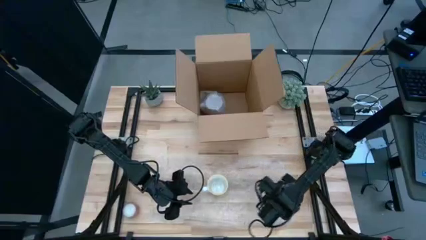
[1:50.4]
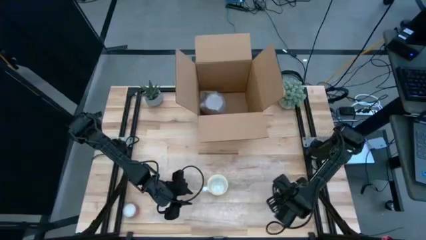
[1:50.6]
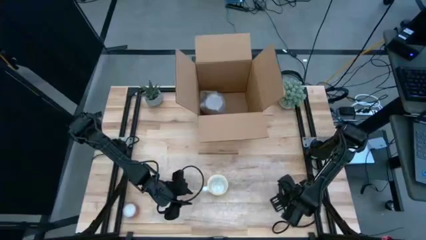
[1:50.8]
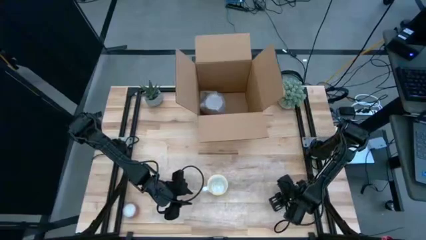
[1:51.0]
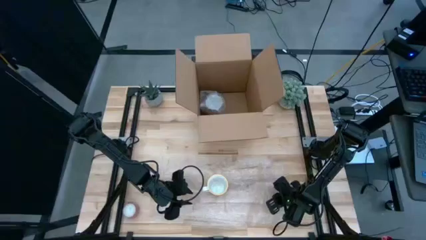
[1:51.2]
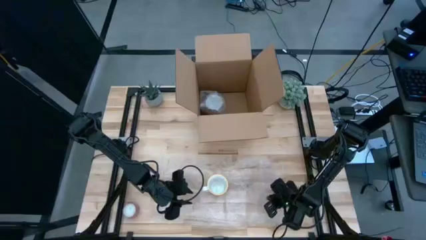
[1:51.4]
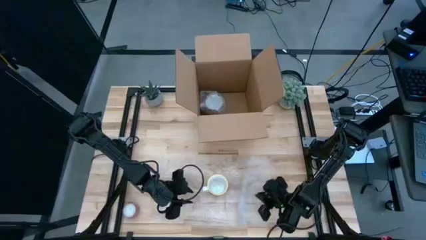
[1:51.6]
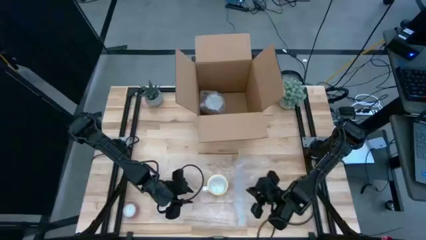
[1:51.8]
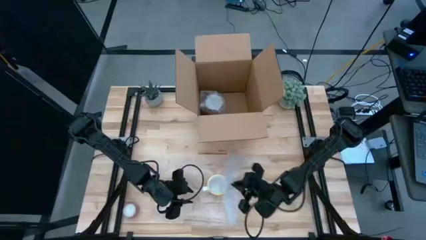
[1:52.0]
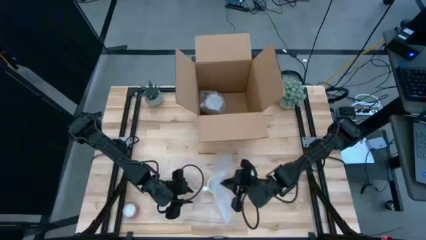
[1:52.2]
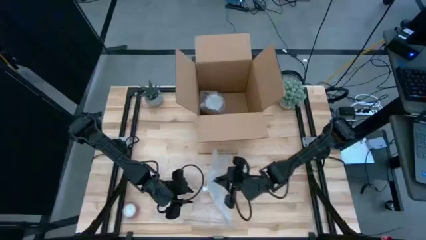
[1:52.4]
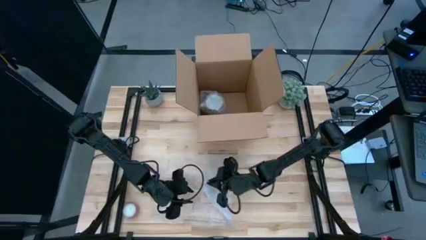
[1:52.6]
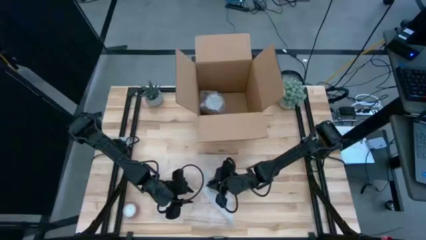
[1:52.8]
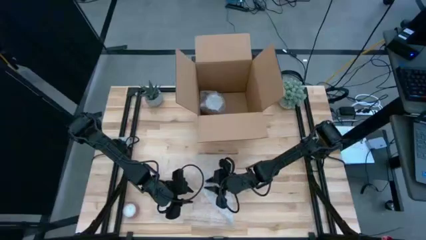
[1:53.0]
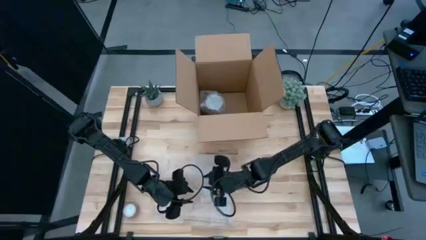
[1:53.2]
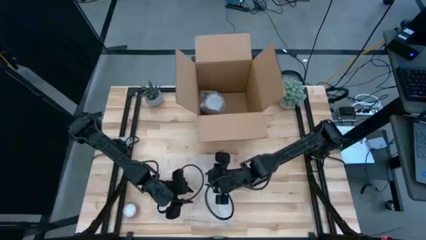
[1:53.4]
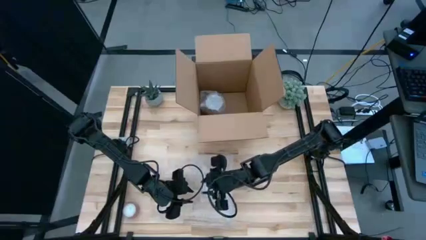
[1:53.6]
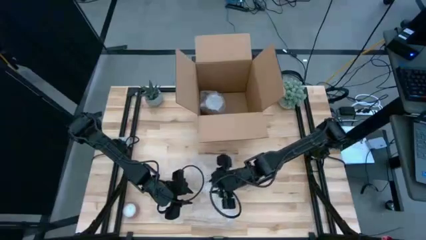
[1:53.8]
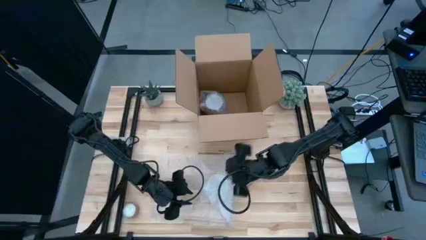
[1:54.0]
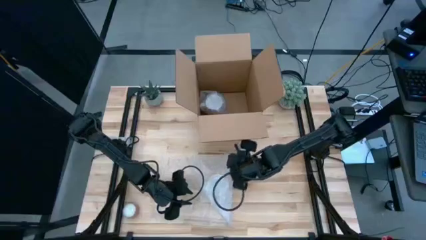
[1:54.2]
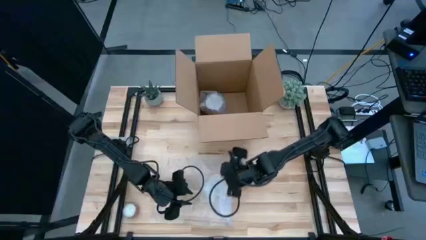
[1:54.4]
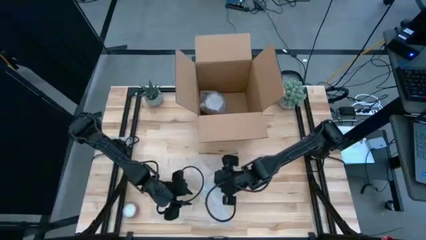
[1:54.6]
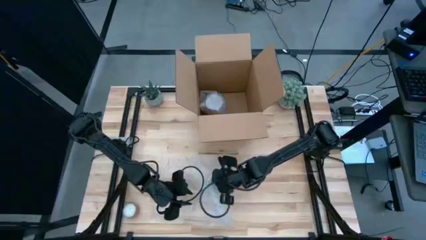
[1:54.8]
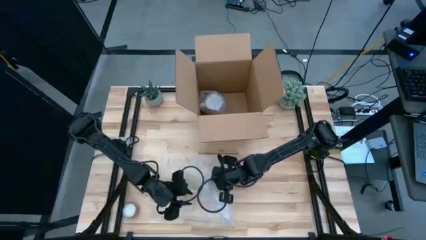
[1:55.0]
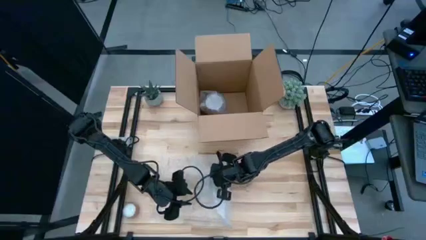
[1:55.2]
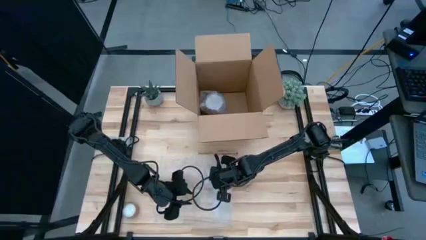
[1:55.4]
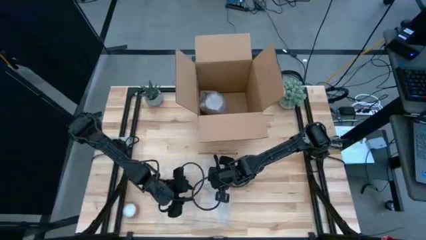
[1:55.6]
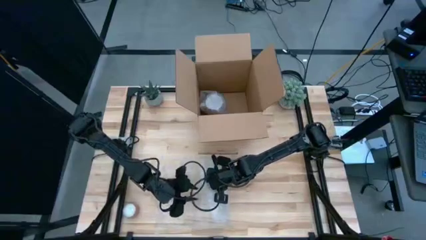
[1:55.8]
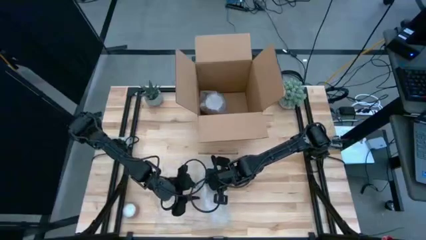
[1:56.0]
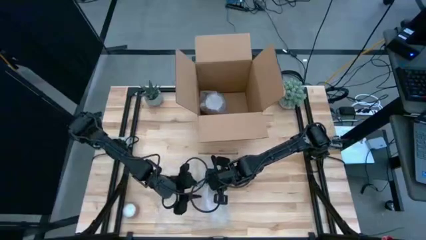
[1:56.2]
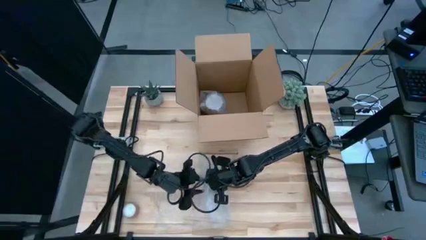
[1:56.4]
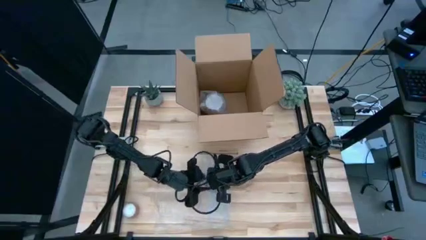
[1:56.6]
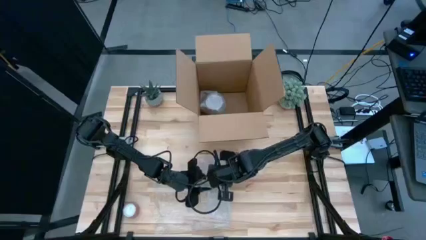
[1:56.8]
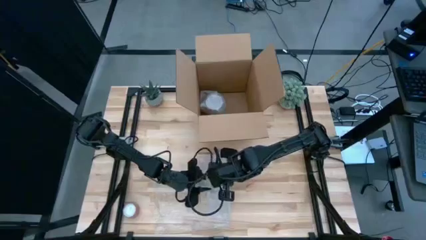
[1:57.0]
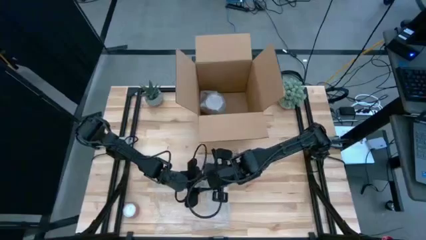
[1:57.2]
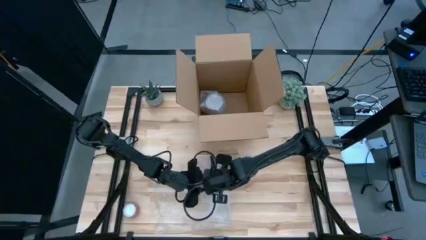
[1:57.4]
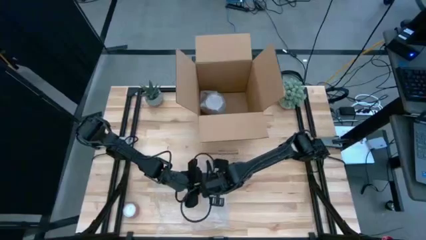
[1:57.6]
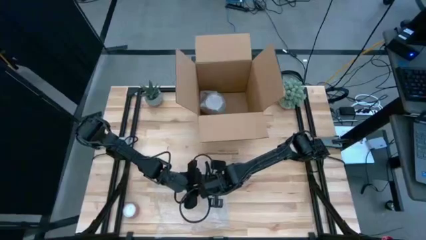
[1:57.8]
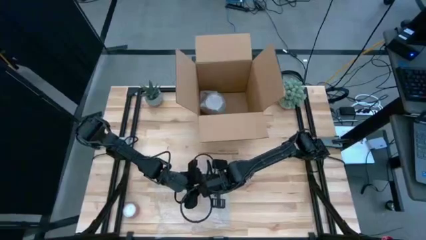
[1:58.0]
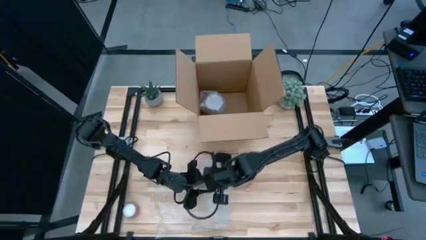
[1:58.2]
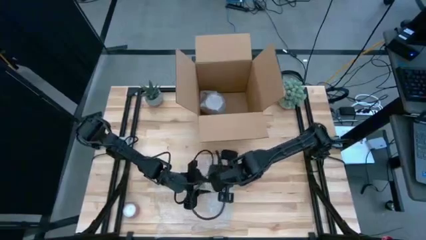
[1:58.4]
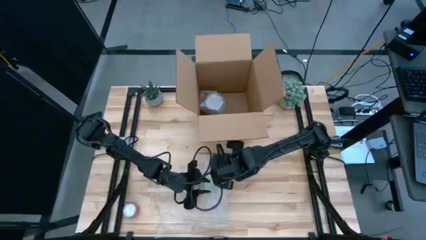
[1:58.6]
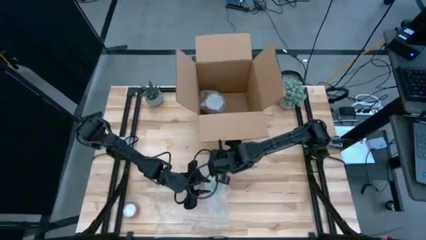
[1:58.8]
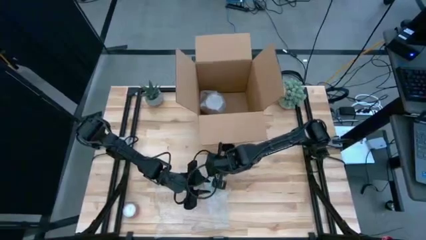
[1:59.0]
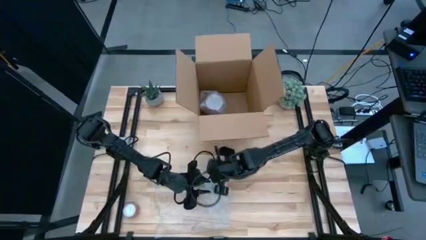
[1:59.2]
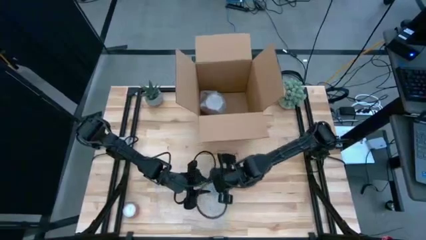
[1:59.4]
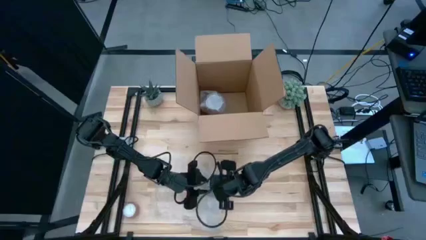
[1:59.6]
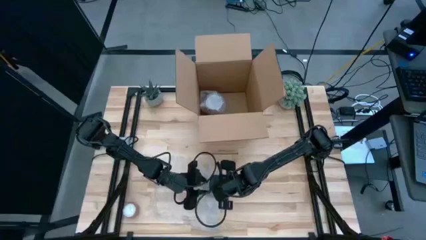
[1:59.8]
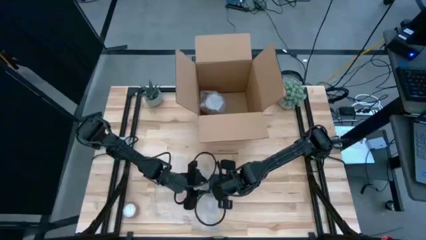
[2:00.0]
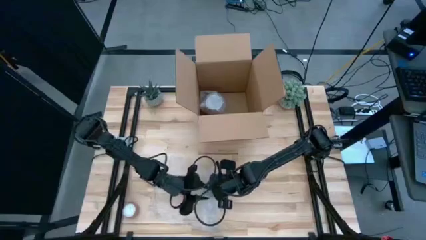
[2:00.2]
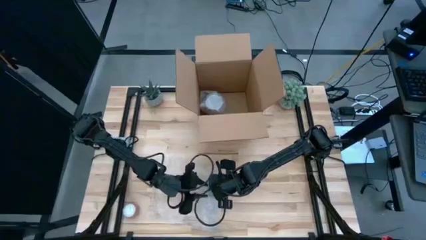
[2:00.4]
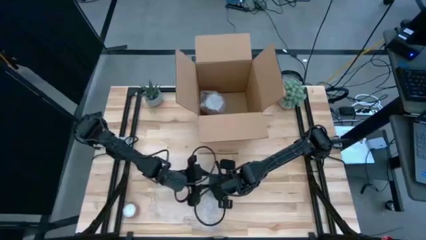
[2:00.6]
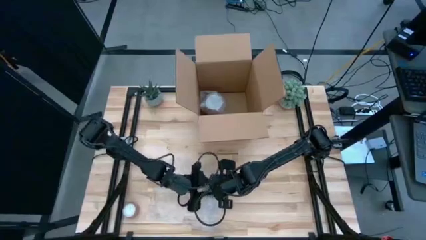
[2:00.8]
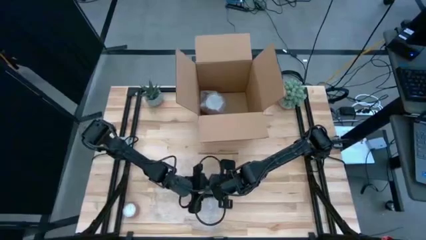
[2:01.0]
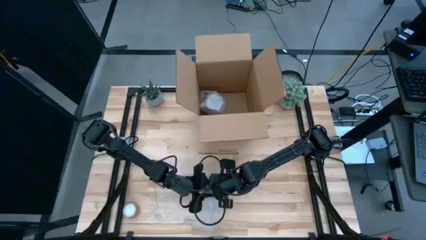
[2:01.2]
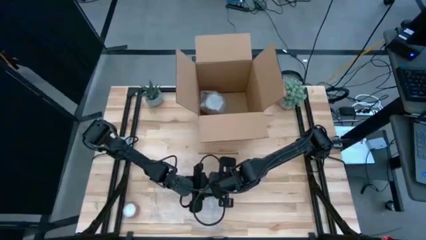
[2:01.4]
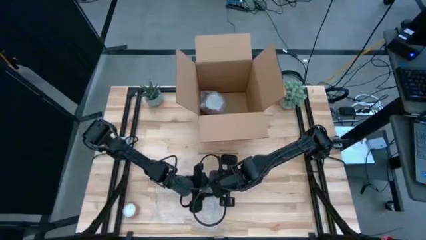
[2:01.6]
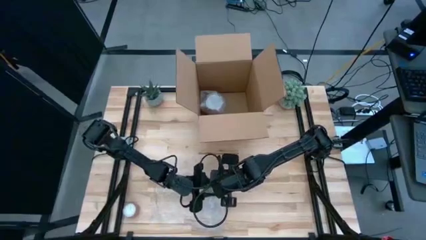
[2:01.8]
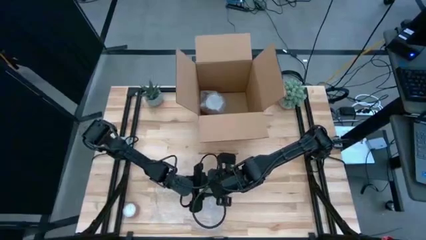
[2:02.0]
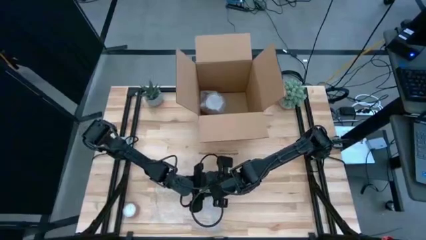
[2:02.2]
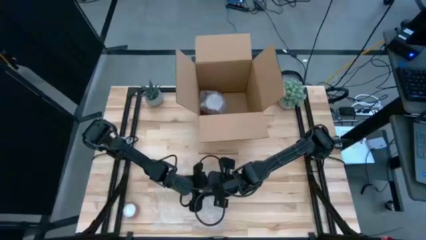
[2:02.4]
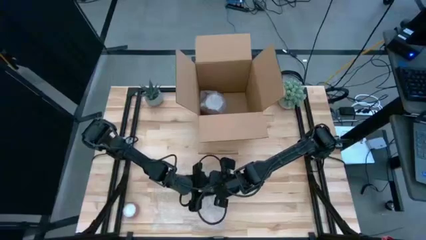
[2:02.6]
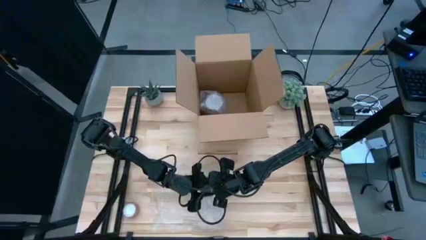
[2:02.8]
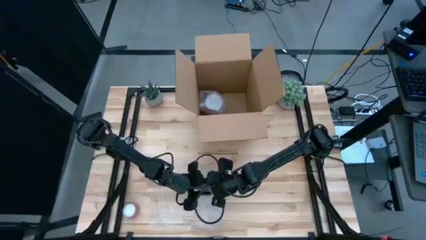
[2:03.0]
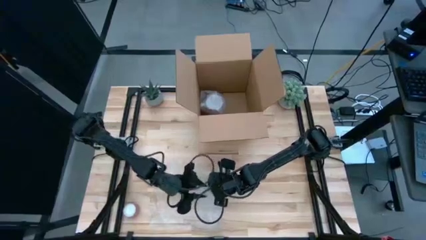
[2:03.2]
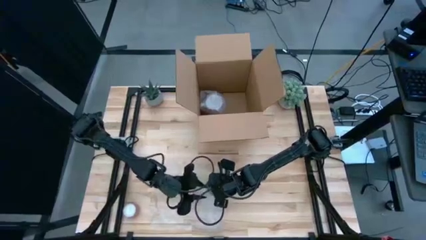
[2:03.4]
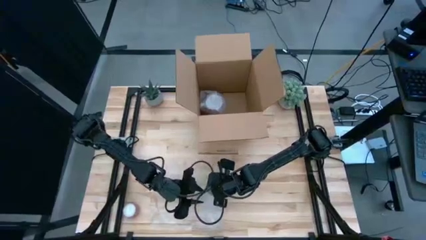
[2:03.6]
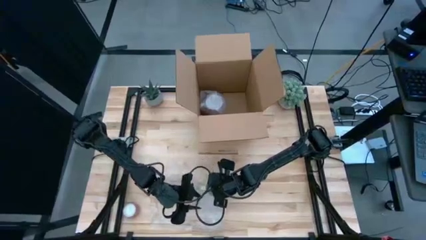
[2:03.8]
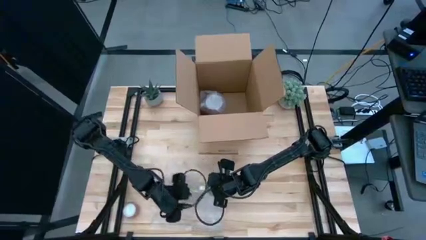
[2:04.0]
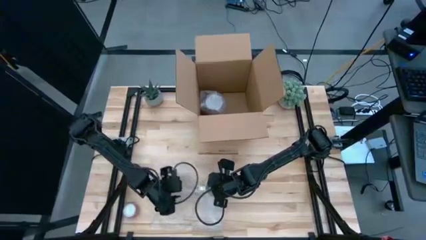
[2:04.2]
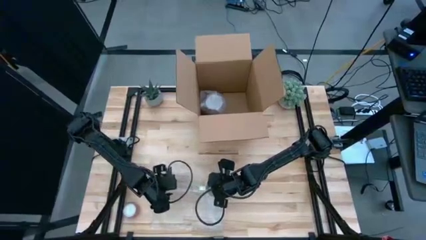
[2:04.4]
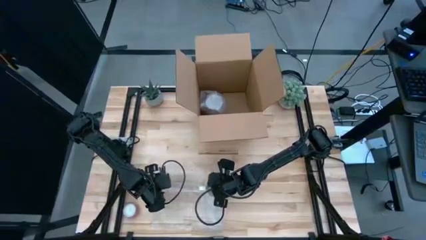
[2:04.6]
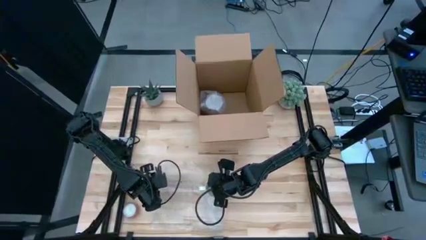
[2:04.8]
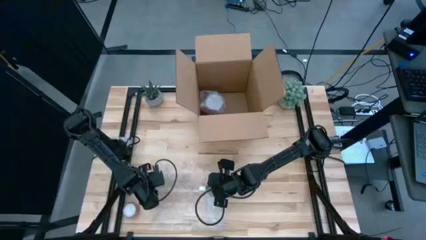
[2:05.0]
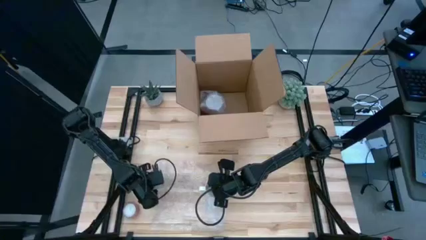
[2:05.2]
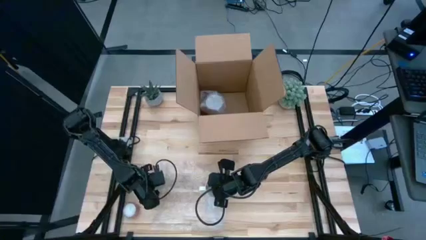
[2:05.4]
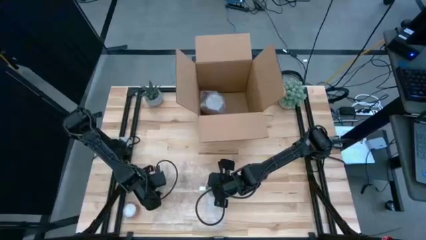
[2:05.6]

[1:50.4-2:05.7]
Task: wrap mug
Wrap the orange mug with the transparent bubble wrap
